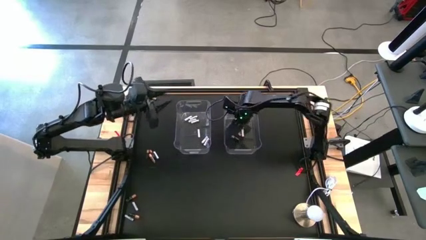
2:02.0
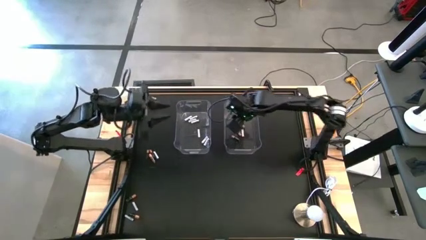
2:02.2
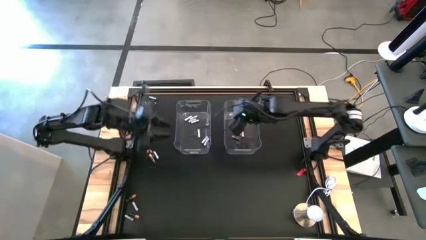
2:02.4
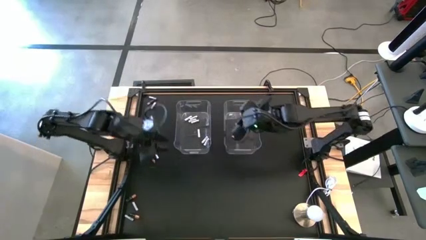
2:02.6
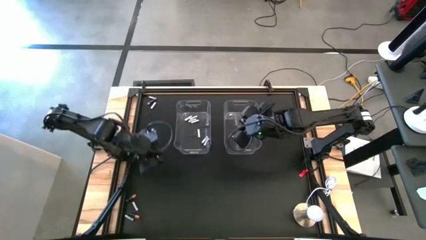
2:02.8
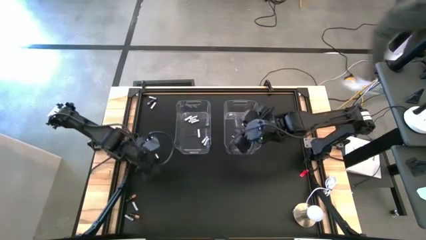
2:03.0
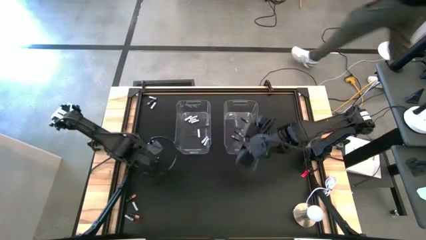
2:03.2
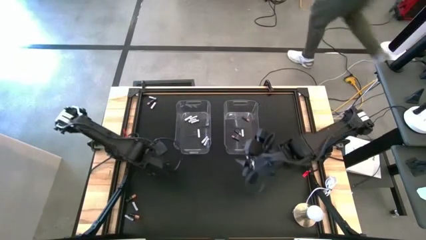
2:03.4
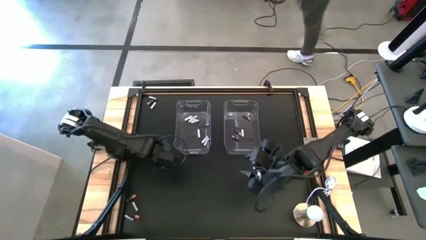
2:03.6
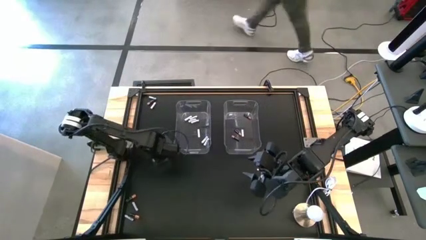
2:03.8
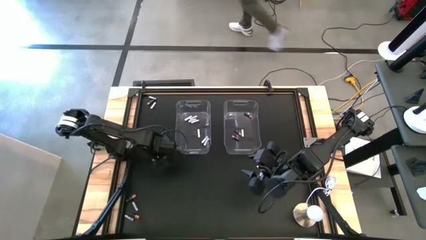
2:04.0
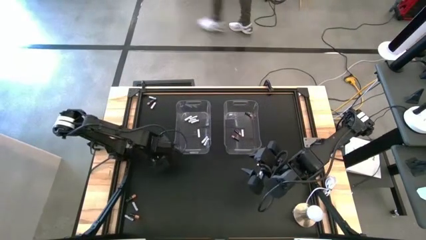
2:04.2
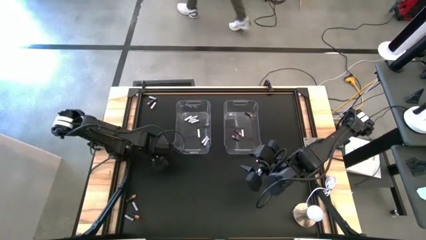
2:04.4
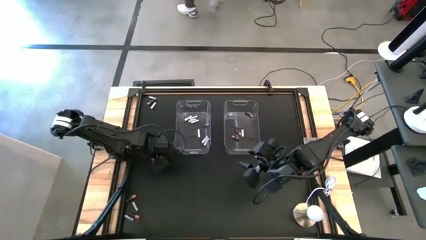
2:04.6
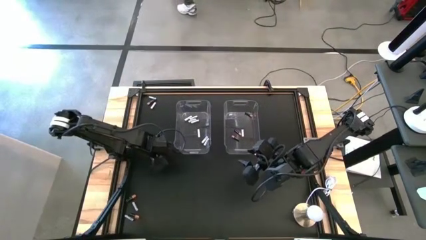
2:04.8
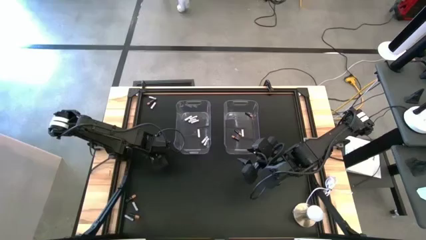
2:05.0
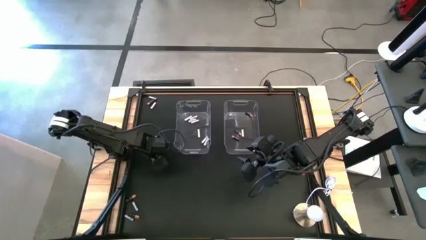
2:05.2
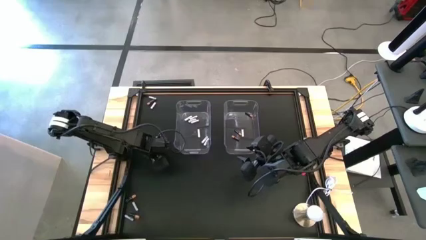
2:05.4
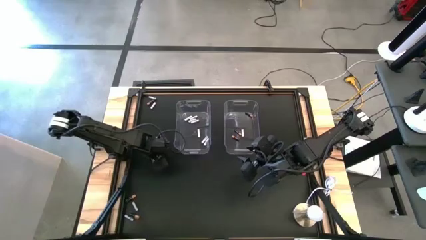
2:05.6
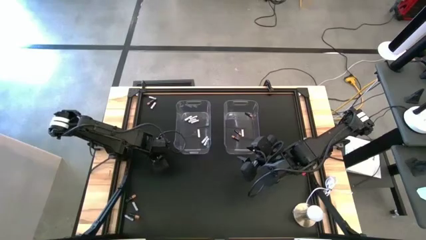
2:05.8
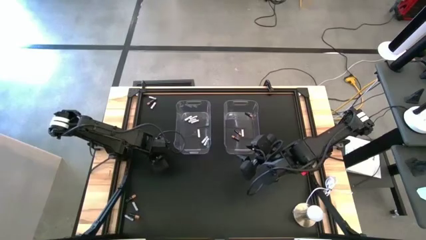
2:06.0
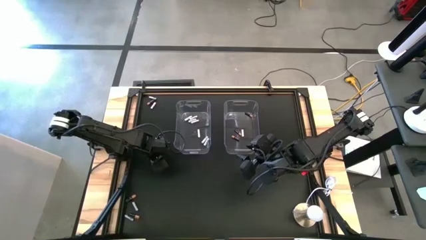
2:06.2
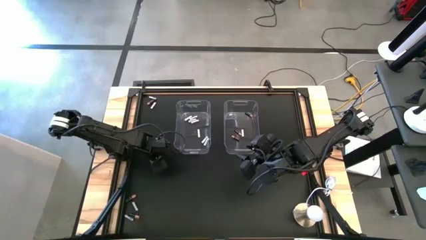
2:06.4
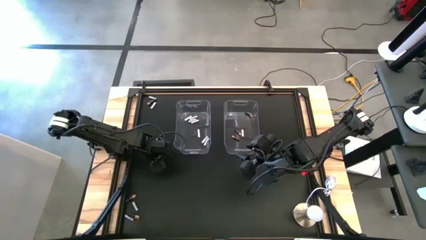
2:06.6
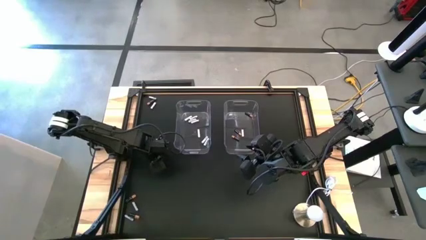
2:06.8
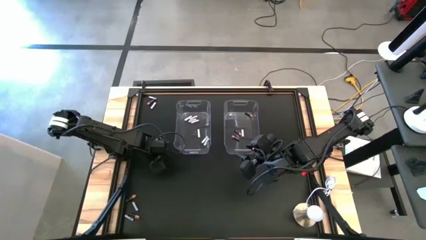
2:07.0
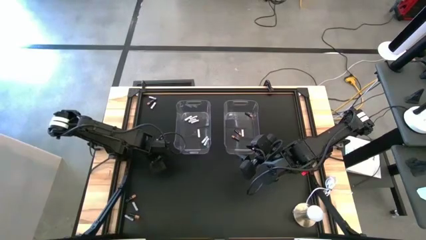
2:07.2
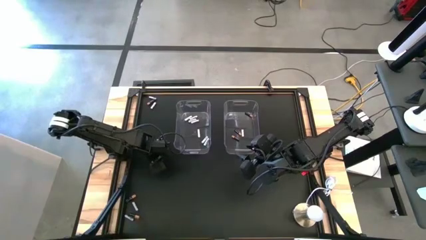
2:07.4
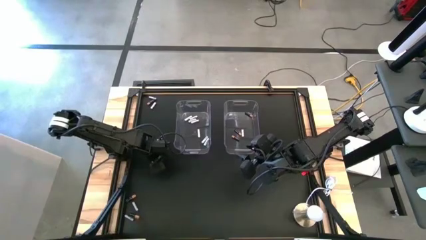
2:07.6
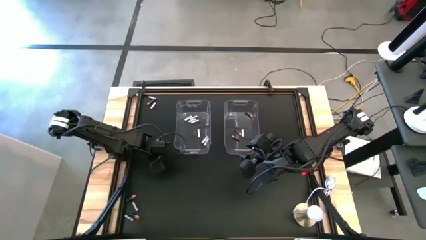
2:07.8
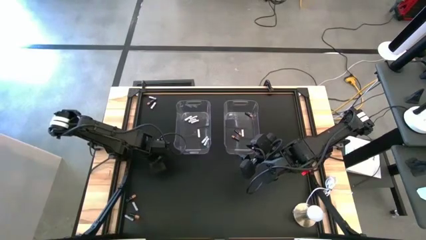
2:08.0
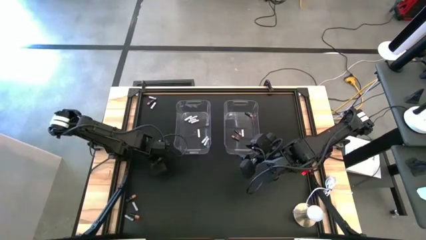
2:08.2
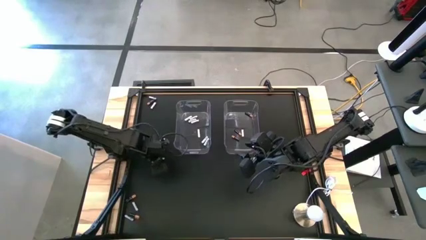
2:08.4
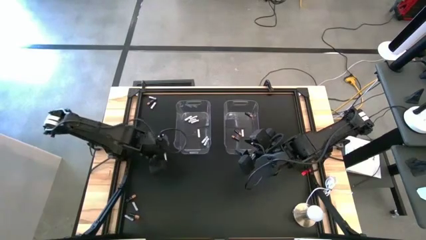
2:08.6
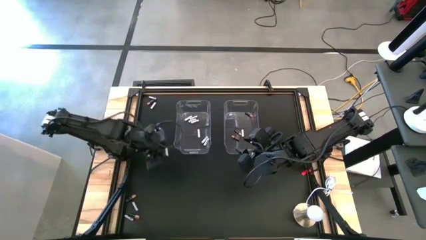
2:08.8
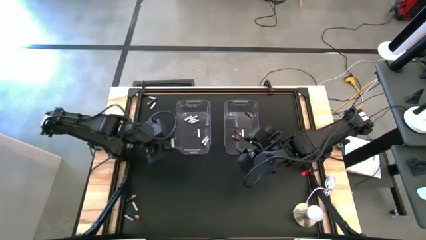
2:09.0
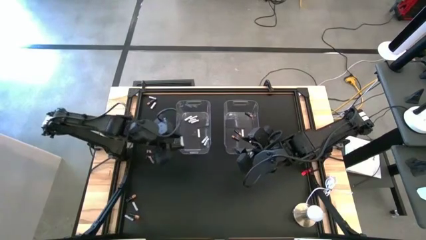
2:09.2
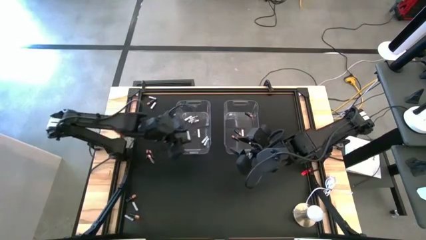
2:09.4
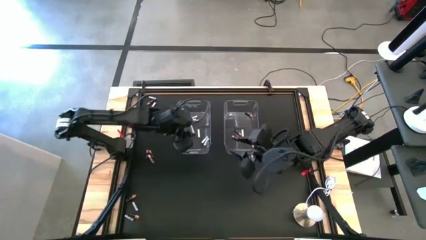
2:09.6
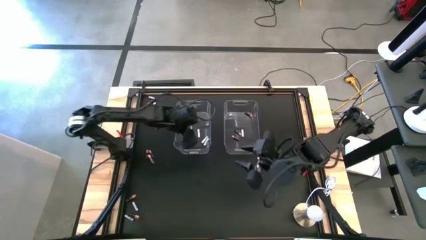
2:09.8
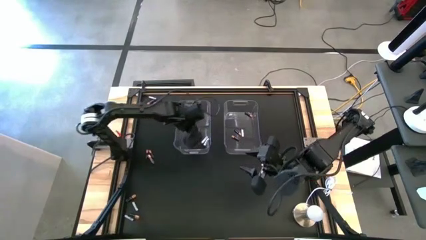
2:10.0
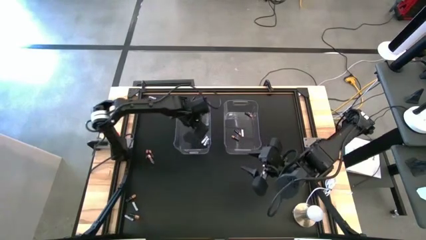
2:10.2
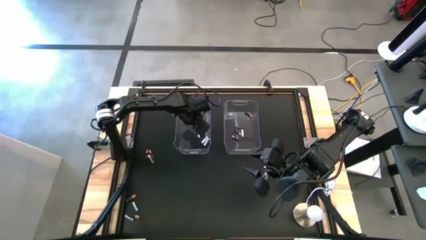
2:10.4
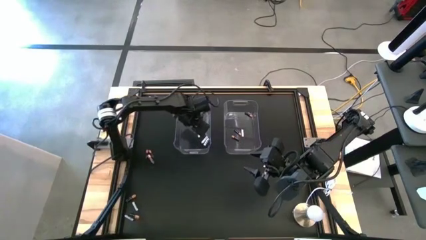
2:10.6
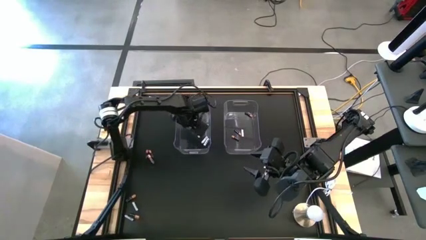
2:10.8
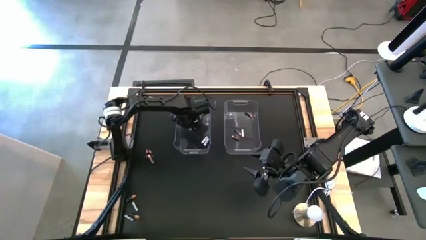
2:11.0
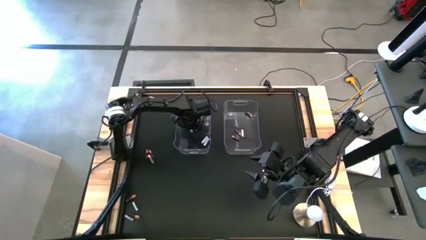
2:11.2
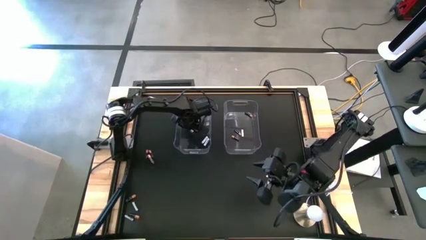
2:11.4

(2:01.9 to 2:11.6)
Task: Sort batteries
Put the white battery into the left transparent bin
